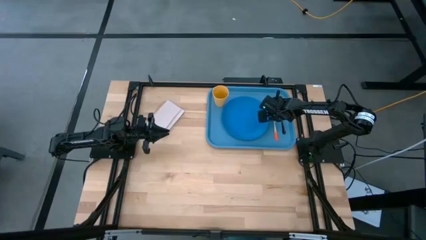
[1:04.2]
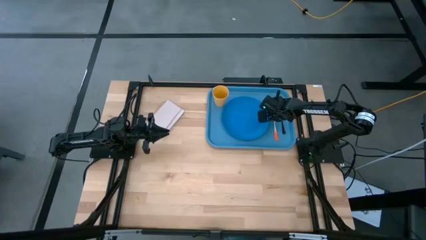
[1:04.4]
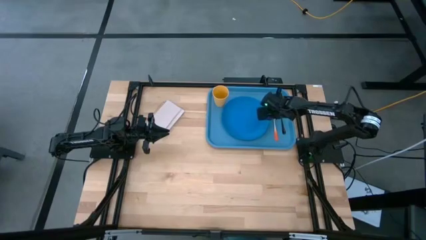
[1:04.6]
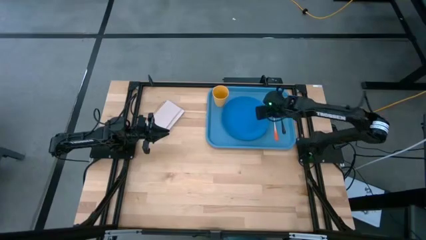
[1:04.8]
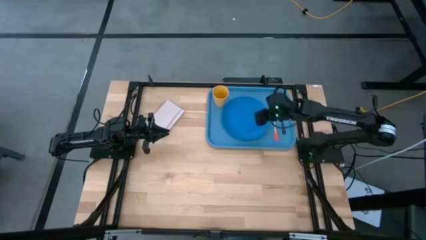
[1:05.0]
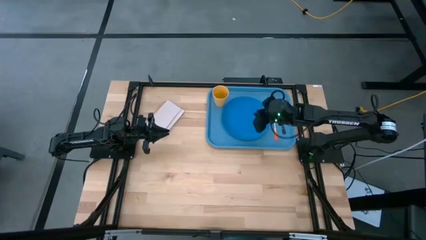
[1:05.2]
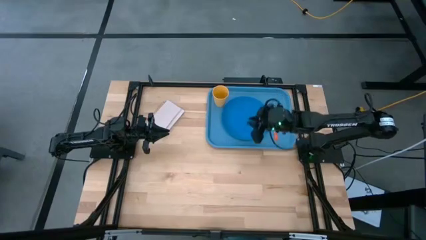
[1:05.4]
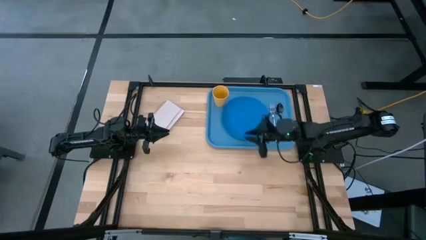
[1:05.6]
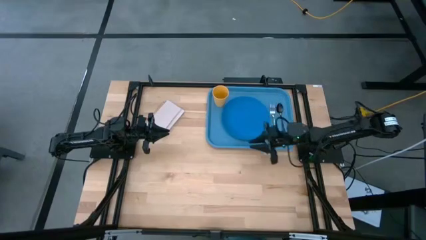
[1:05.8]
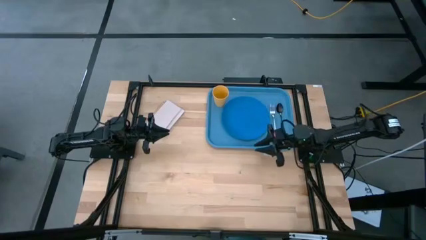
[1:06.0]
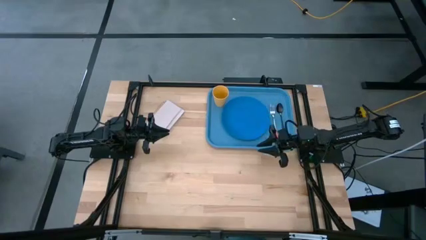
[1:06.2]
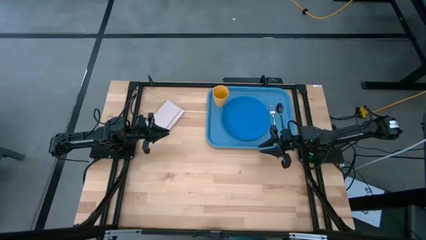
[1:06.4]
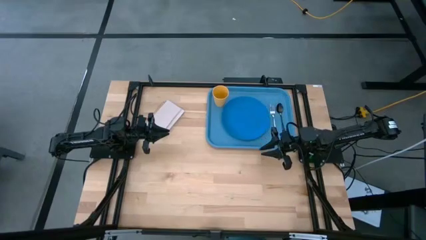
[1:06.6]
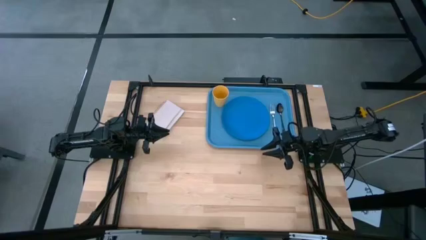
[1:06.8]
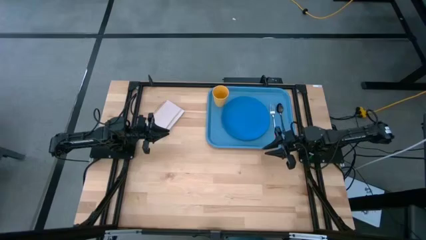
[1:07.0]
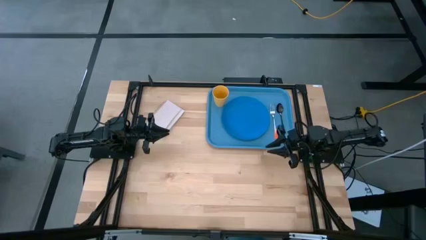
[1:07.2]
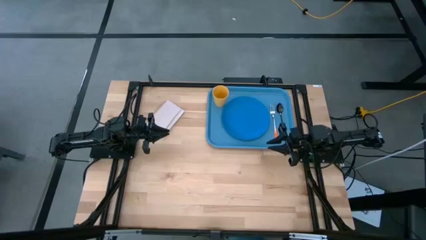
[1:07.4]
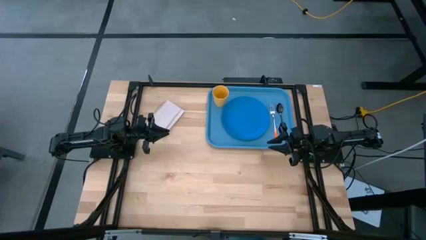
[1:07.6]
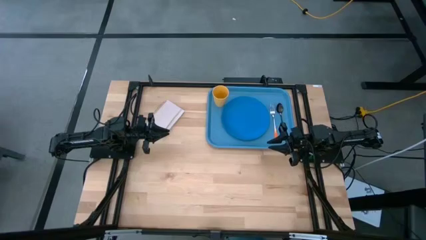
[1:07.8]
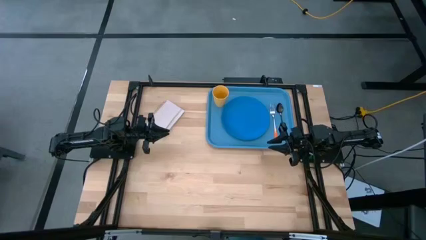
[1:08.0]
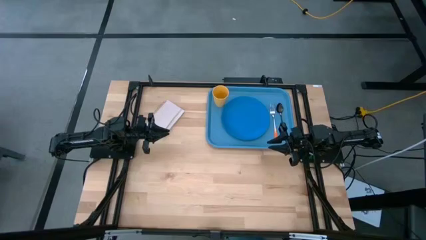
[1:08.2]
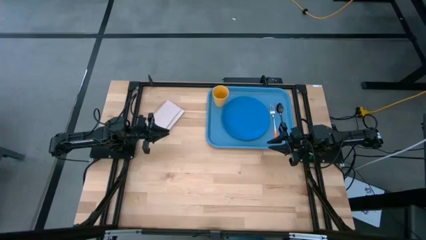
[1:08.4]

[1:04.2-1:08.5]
Task: Pick and place plate/cup/fork/spoon on tray
Return to Home Position

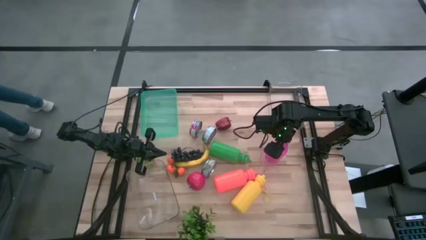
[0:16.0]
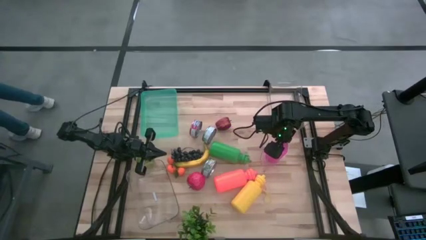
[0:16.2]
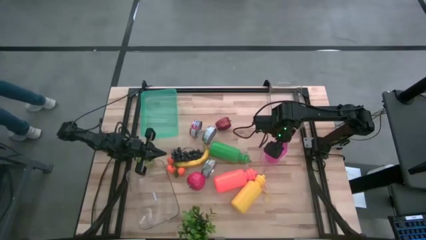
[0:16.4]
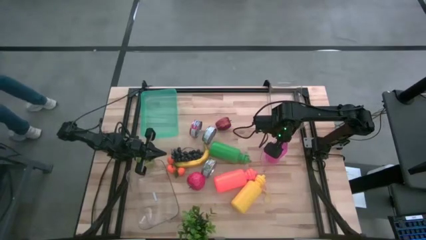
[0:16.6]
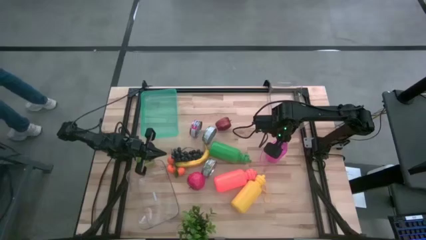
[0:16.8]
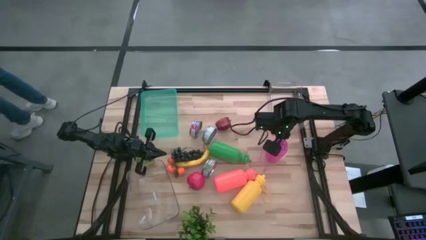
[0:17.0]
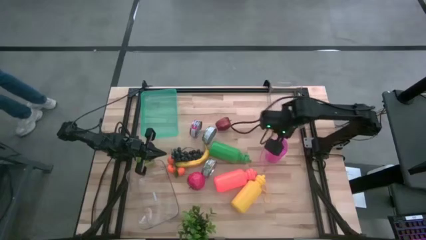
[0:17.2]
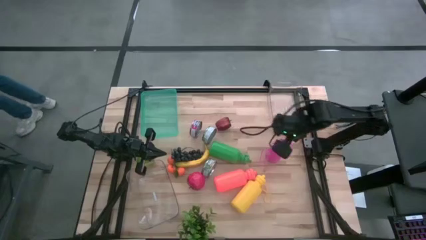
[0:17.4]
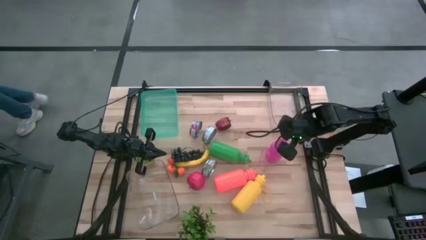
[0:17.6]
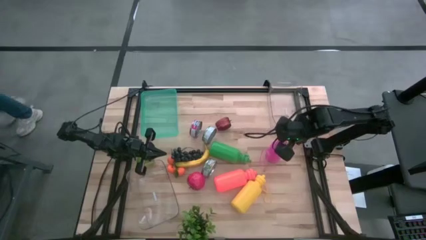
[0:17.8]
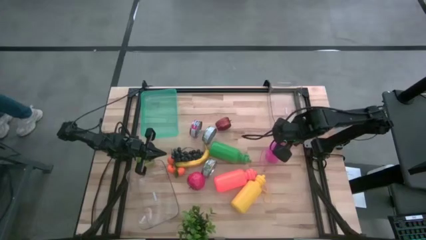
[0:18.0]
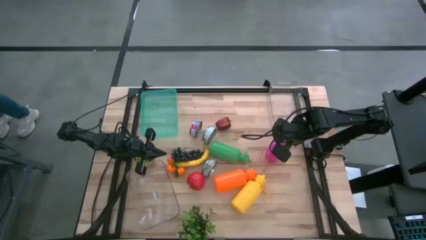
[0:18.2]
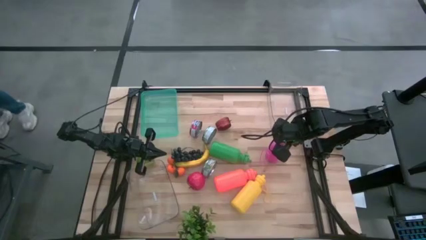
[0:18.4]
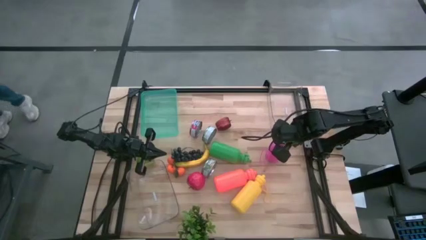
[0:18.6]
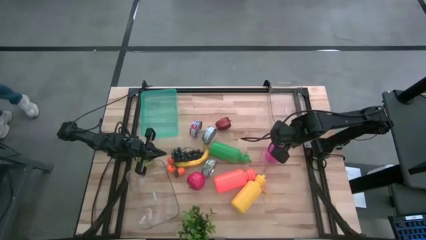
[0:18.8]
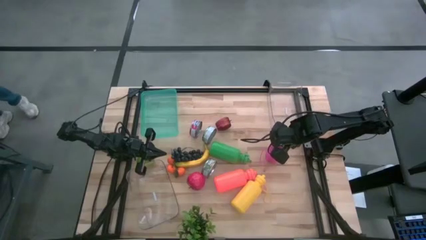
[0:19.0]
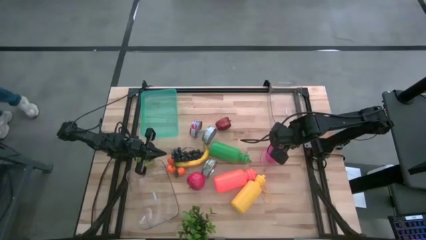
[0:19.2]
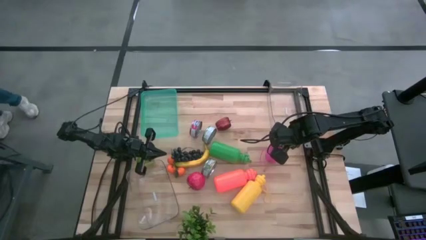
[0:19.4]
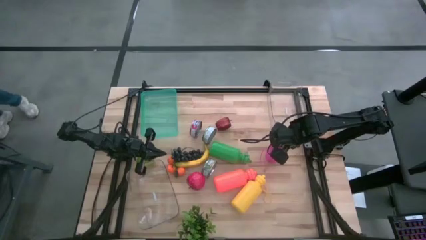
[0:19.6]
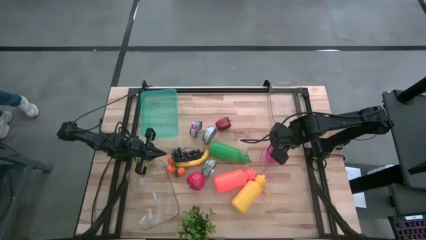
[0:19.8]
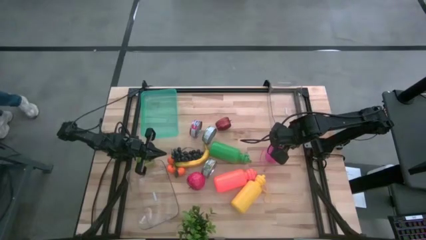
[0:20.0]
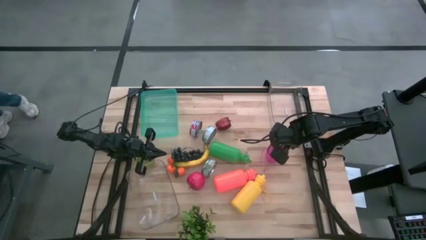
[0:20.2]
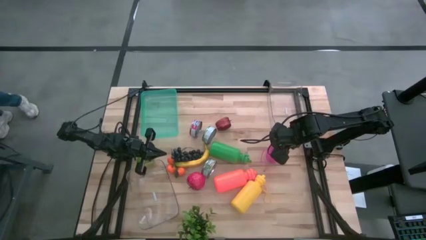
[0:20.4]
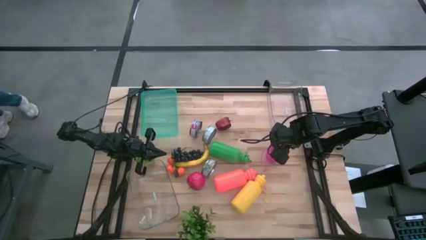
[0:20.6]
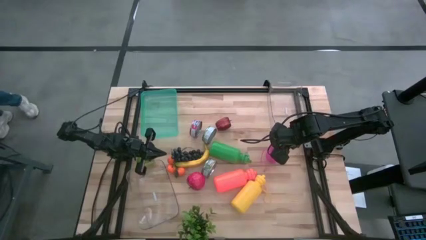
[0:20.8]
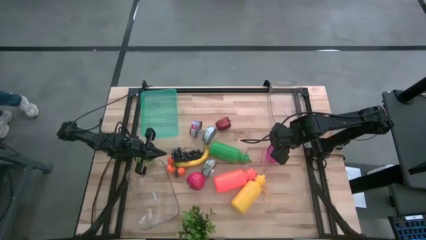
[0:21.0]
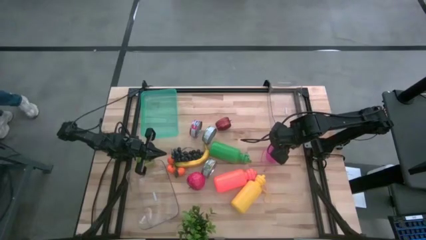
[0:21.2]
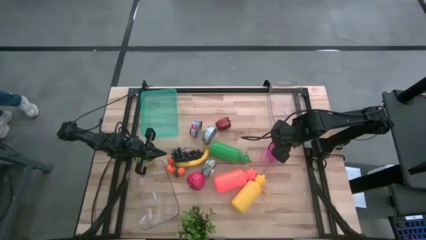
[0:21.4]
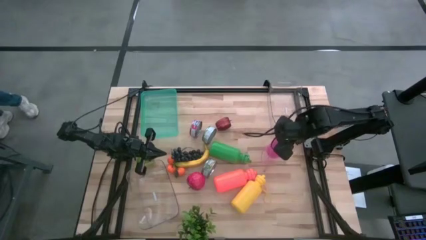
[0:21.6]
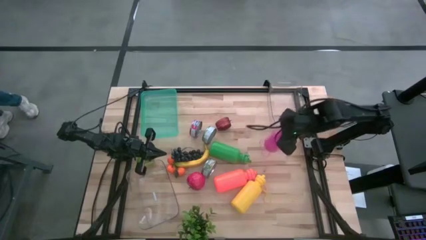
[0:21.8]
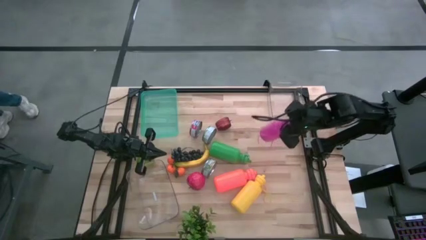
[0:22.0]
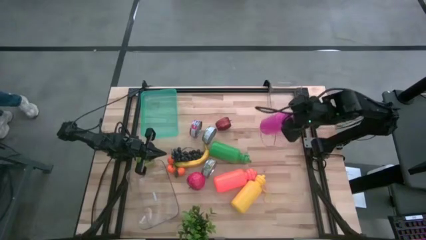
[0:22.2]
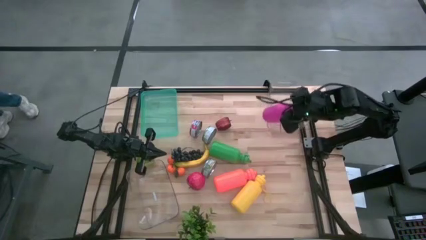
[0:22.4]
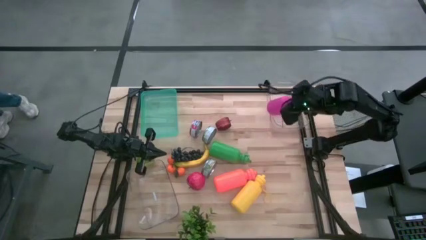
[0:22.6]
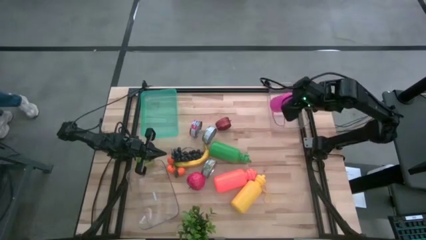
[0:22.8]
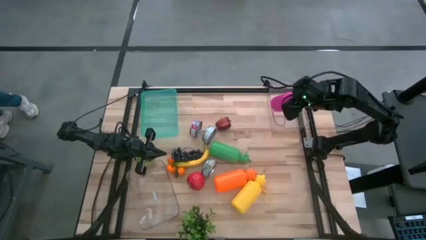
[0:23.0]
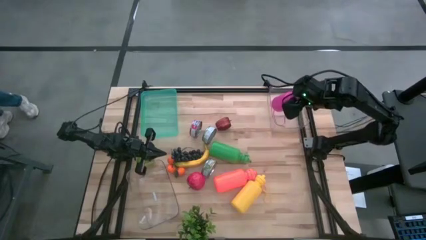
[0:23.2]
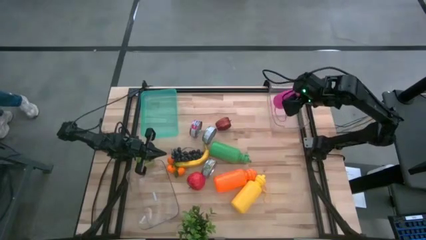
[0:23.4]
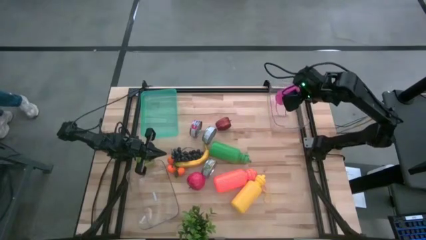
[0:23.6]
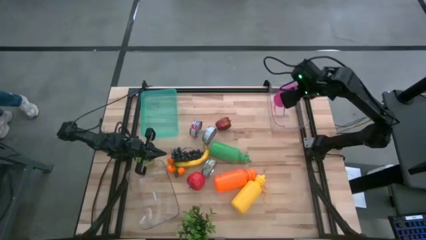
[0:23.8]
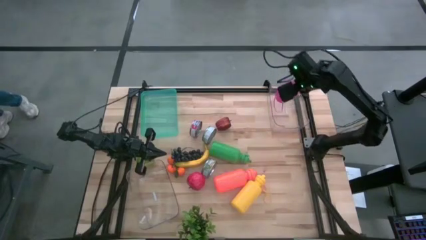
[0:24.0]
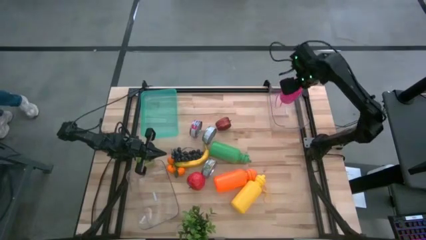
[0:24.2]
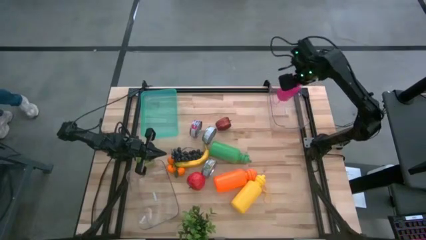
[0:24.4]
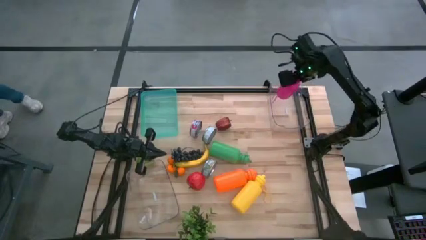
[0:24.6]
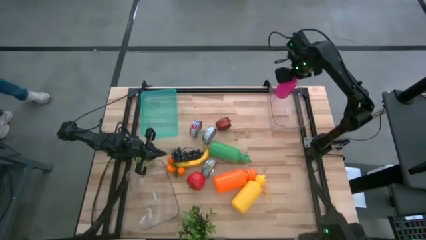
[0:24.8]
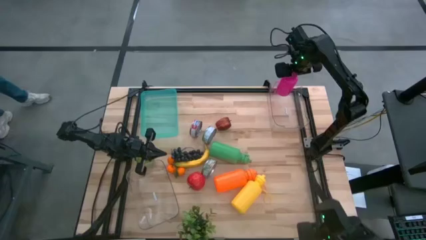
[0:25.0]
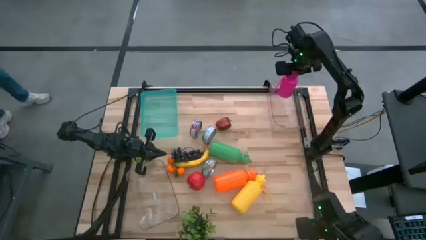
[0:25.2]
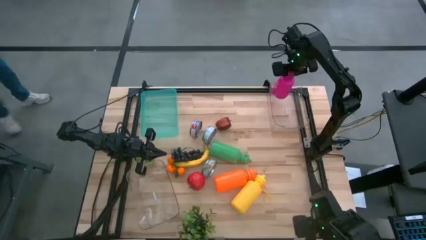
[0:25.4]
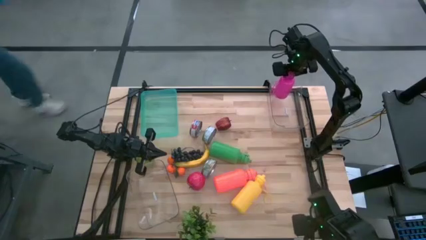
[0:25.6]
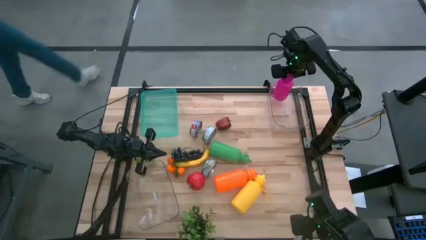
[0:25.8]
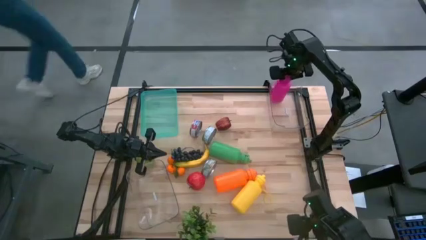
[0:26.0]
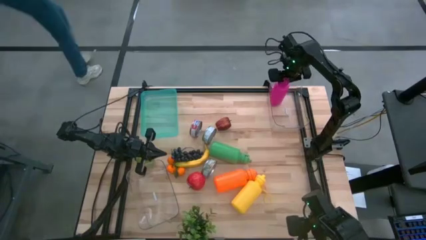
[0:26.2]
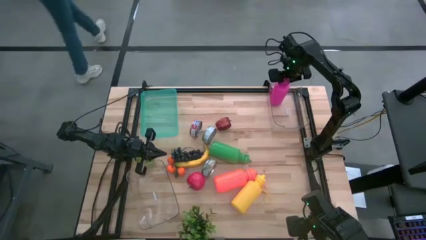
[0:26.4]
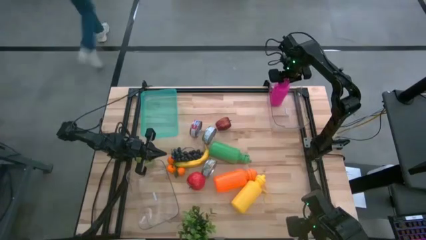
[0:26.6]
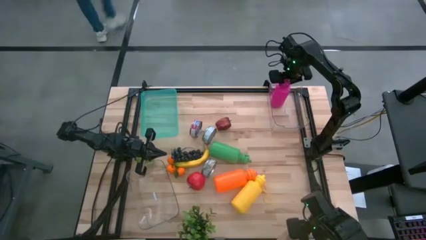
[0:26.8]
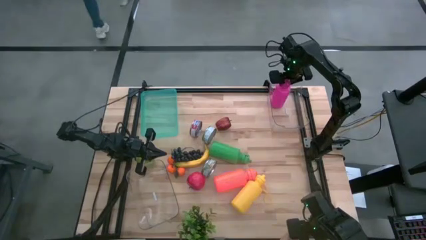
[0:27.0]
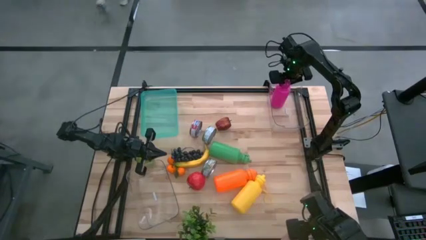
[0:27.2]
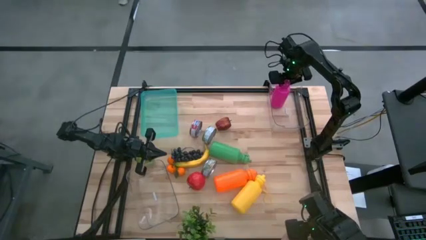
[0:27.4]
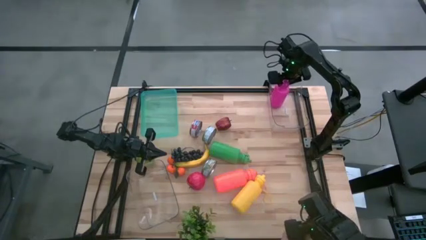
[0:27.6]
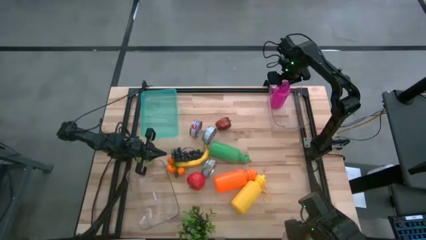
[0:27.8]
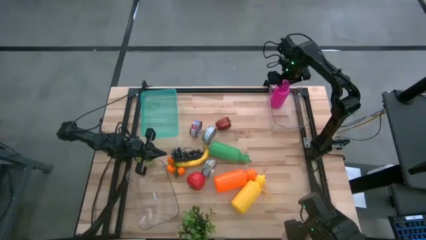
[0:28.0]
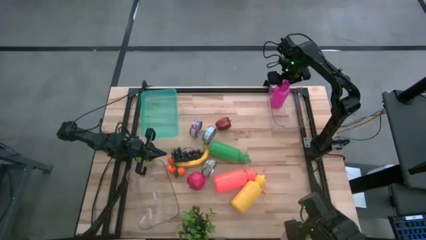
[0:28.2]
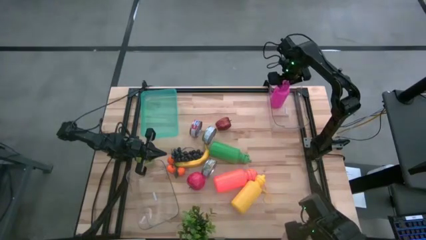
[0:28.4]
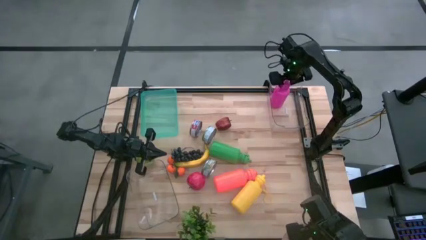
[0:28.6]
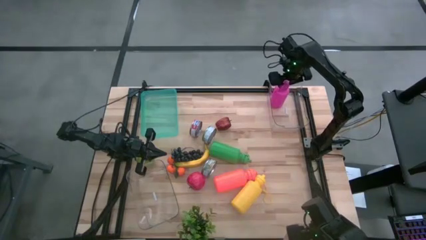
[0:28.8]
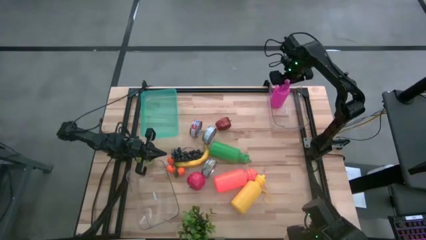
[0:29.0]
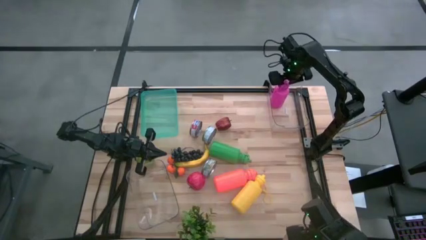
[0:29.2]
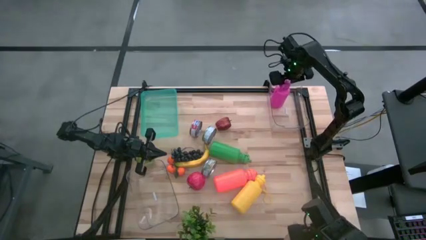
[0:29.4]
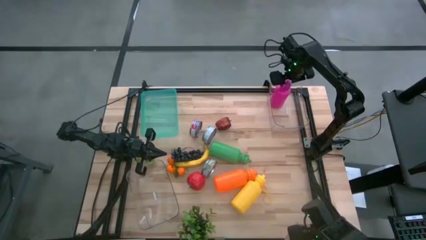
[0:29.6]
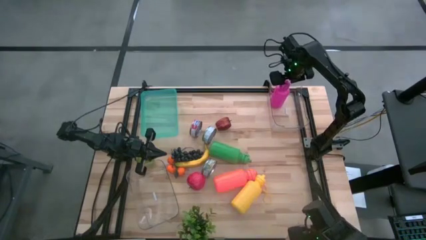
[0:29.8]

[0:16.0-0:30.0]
Task: Pick & Place Food Item
Put the pink tumbler bottle into the top right transparent bin
